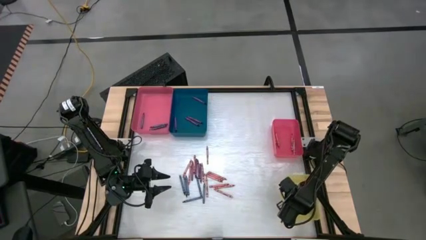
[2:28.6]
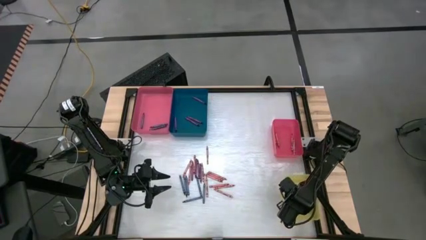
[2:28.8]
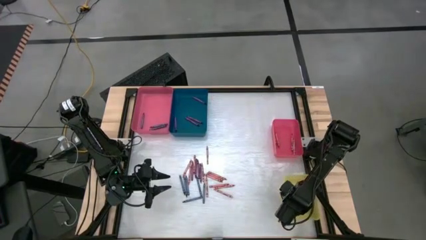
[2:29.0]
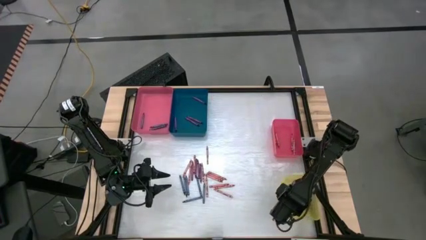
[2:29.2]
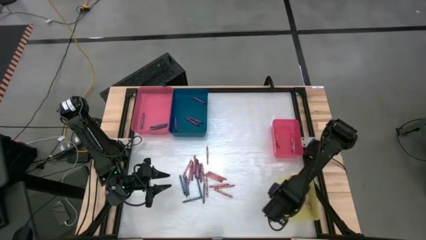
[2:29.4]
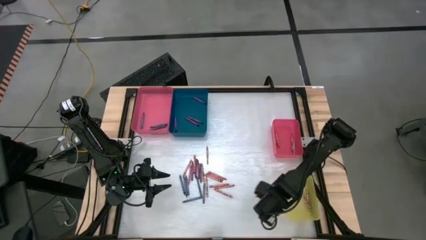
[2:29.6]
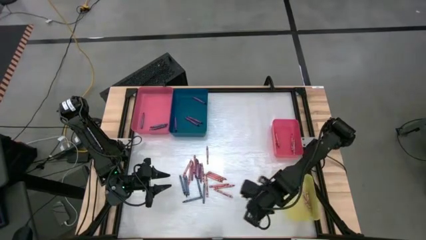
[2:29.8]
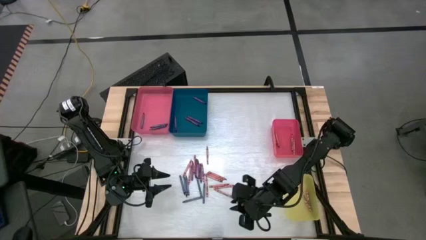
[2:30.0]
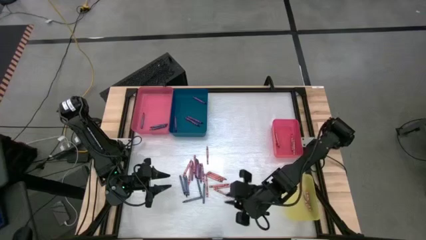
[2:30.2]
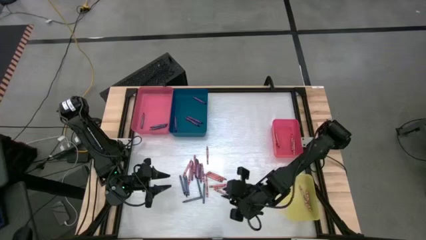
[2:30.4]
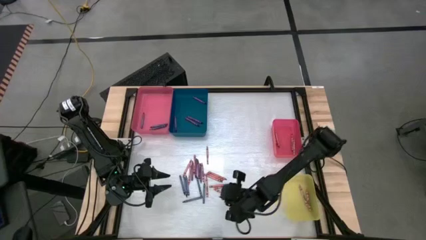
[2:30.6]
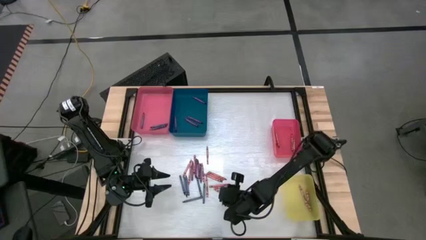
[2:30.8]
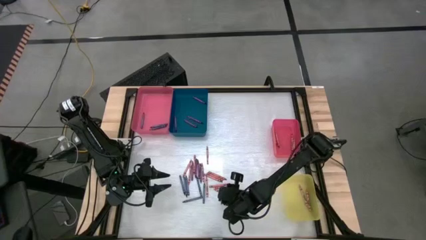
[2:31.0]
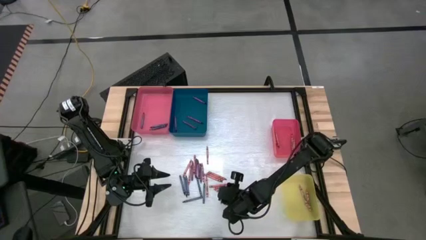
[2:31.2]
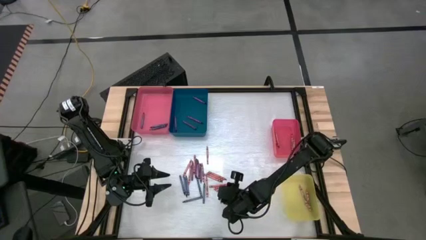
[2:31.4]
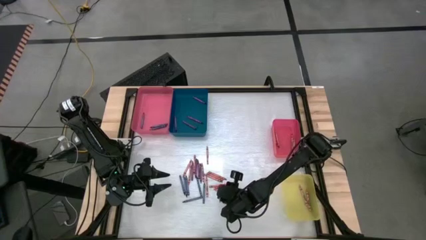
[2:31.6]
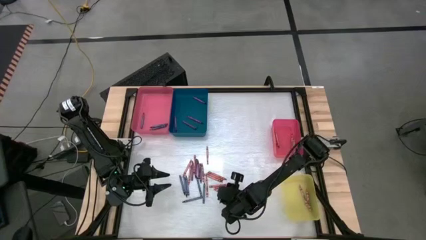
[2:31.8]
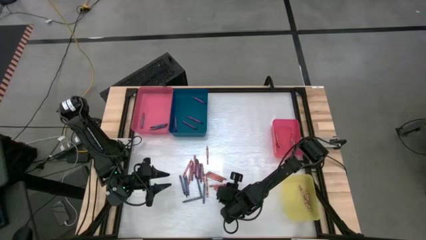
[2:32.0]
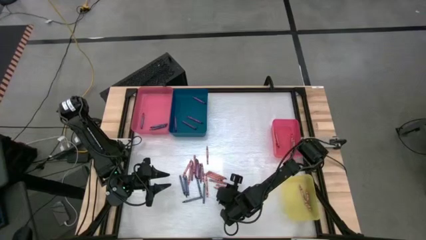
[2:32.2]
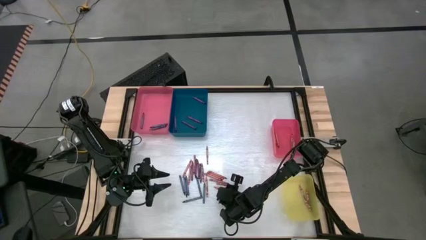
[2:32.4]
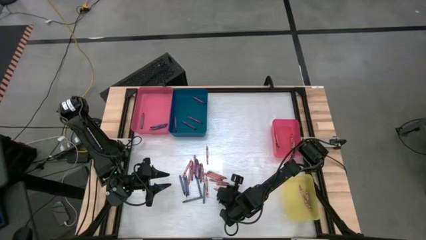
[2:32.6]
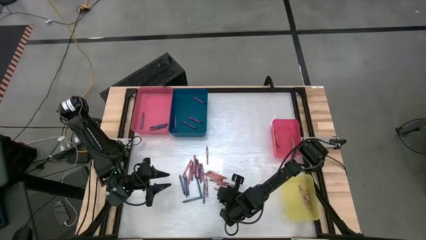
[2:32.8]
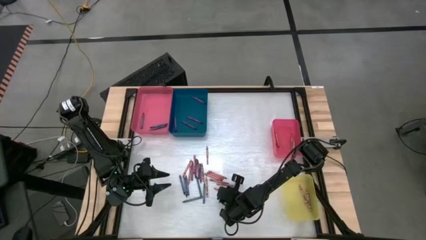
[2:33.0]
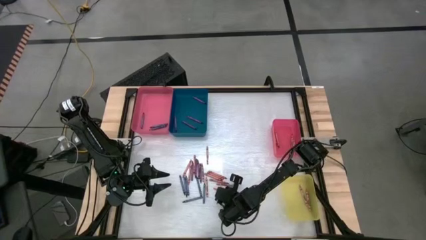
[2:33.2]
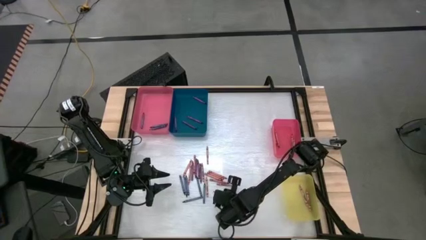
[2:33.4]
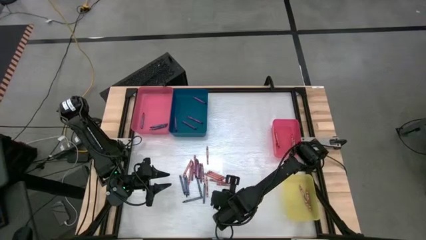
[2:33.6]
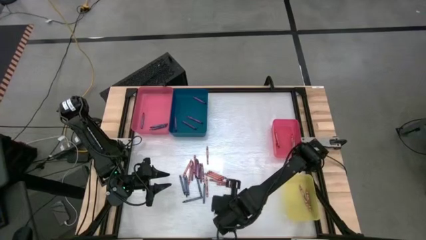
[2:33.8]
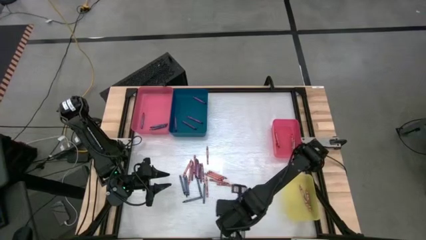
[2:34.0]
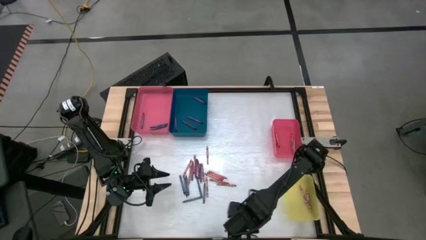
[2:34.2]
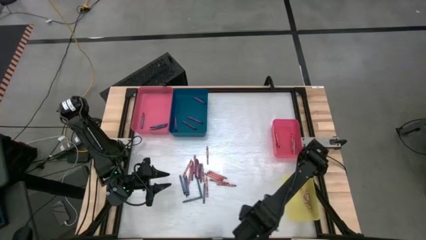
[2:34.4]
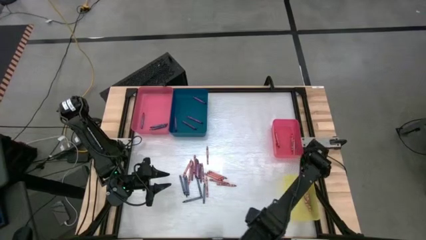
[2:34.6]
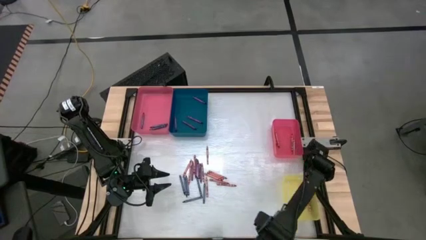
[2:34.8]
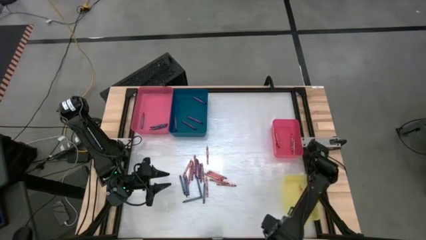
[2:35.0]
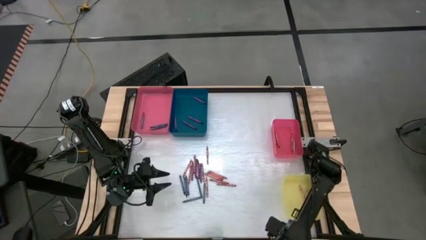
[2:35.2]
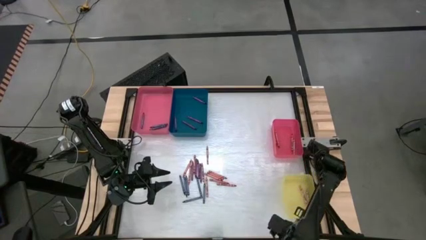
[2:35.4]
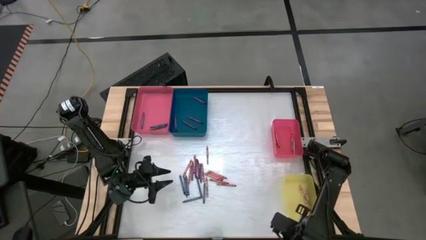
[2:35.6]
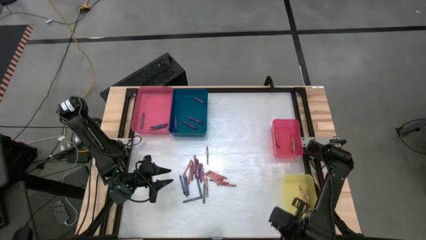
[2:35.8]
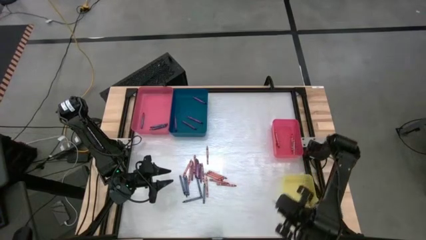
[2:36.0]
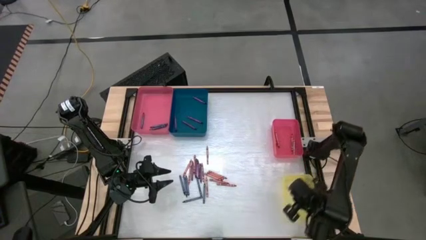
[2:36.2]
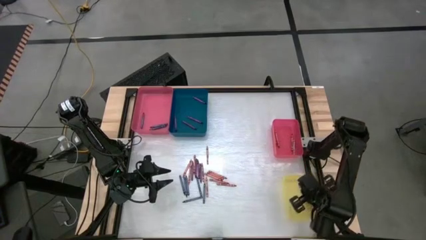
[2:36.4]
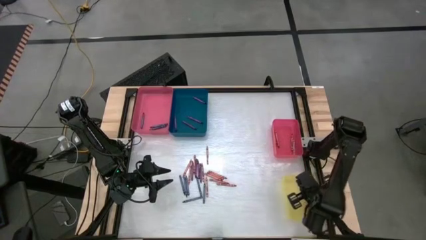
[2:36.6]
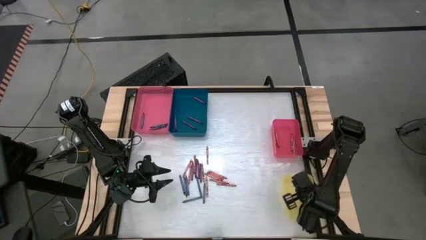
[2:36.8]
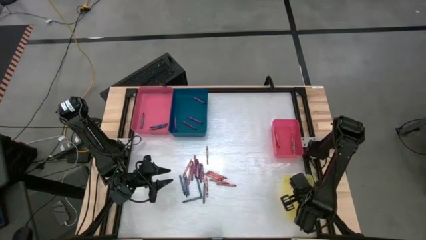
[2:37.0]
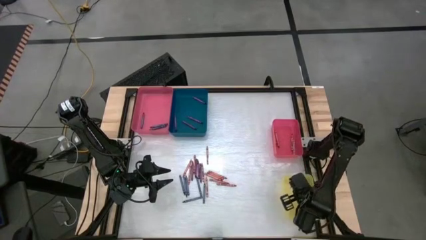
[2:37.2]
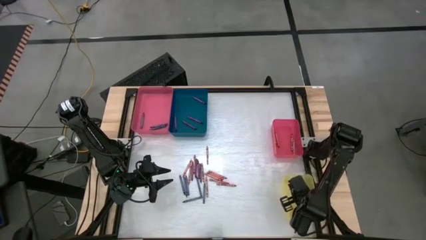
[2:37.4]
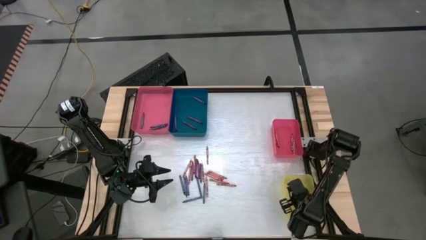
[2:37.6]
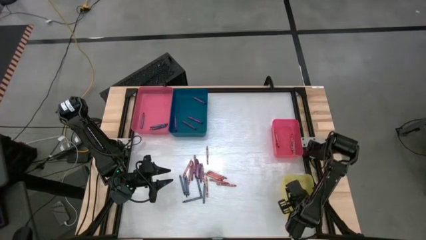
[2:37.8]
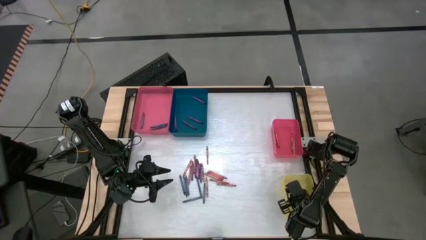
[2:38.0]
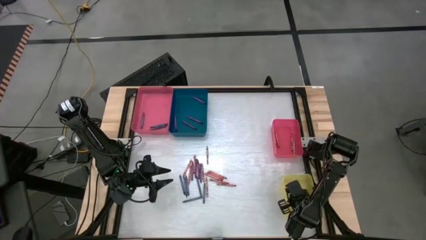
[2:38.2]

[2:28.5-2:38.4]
Task: Sort crayons
Put the pink crayon into the yellow bin

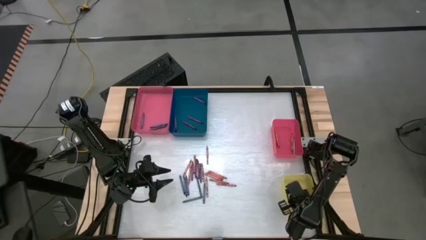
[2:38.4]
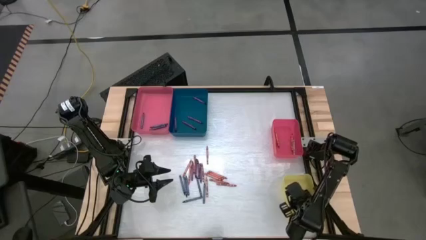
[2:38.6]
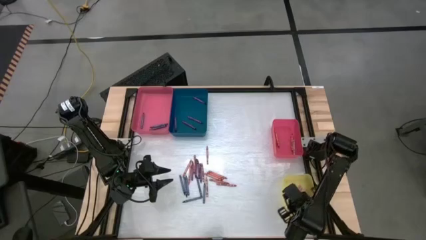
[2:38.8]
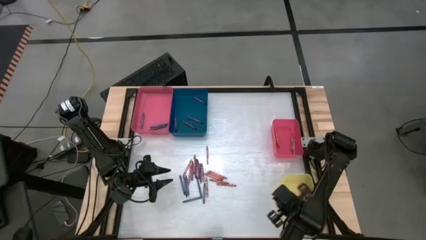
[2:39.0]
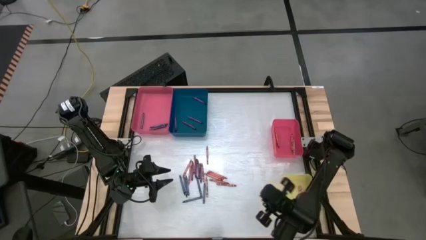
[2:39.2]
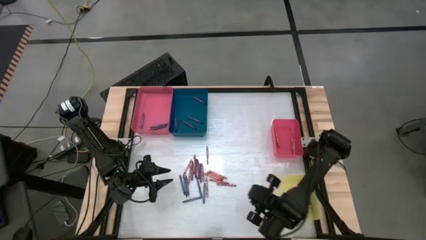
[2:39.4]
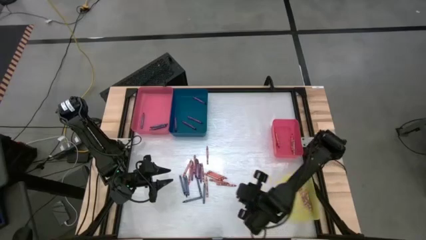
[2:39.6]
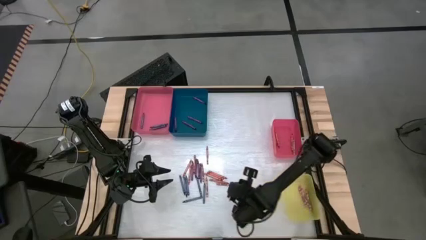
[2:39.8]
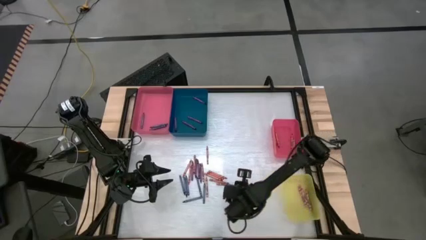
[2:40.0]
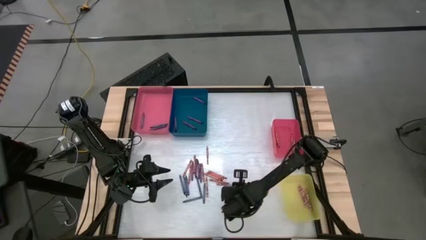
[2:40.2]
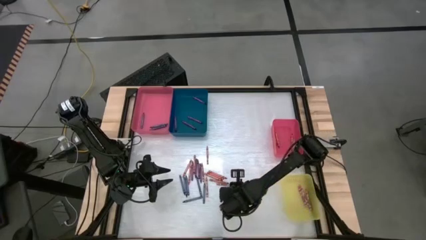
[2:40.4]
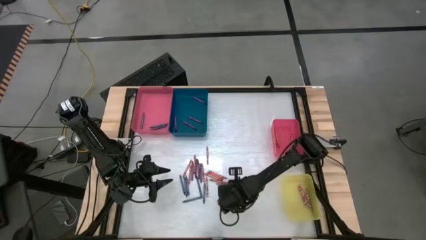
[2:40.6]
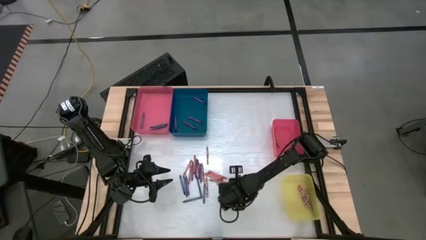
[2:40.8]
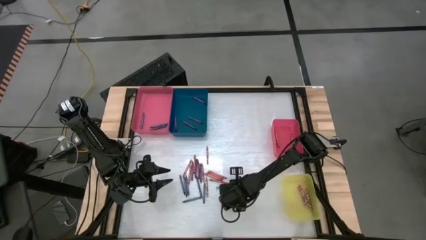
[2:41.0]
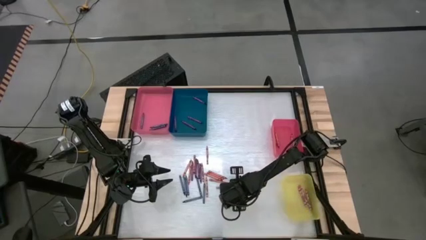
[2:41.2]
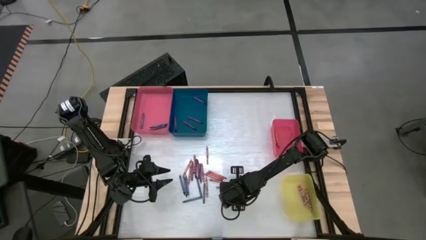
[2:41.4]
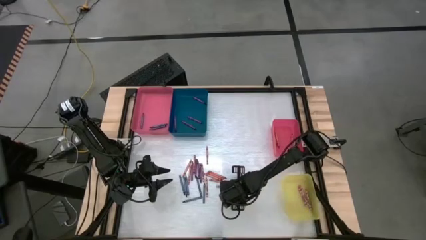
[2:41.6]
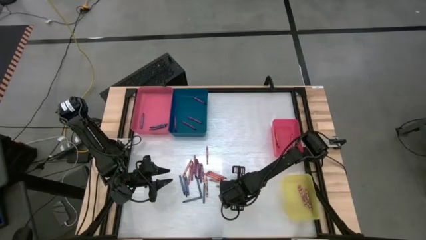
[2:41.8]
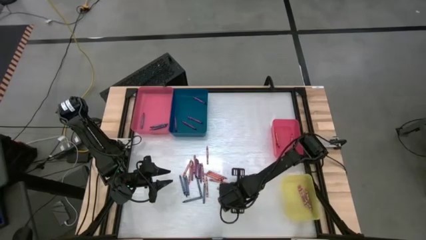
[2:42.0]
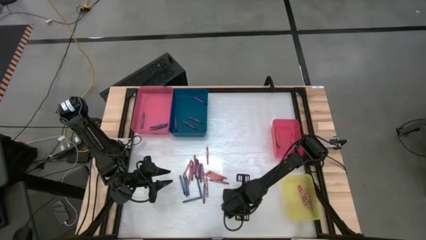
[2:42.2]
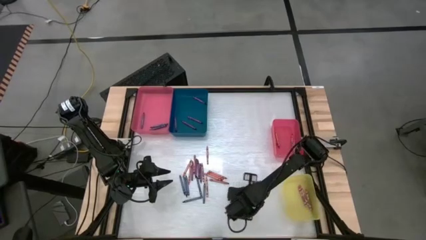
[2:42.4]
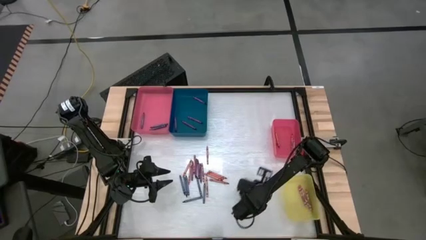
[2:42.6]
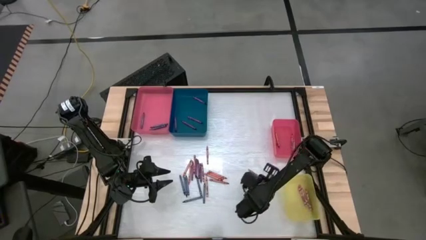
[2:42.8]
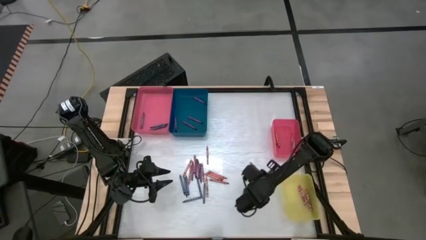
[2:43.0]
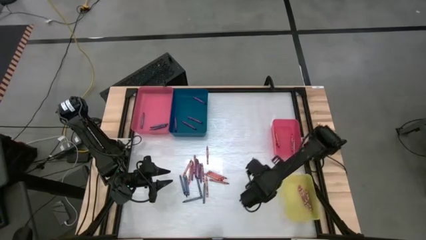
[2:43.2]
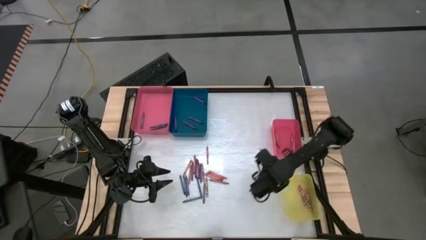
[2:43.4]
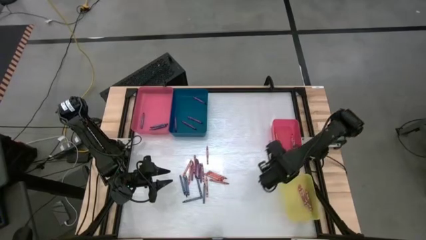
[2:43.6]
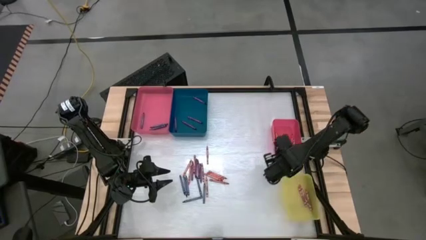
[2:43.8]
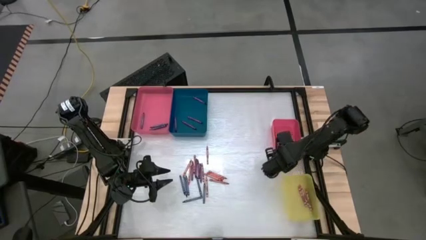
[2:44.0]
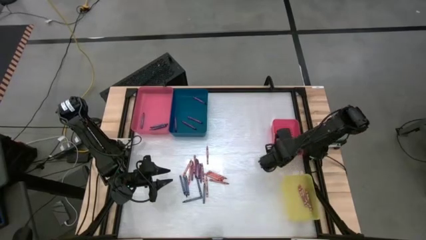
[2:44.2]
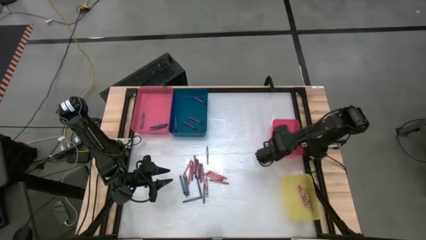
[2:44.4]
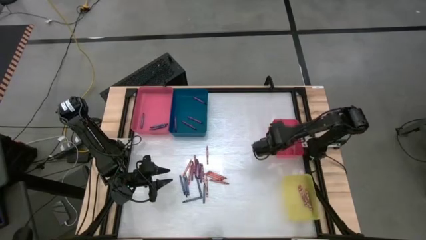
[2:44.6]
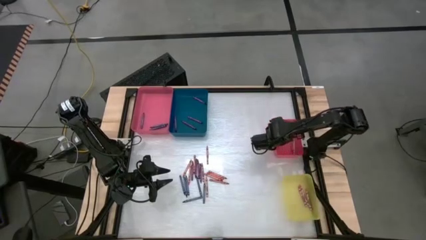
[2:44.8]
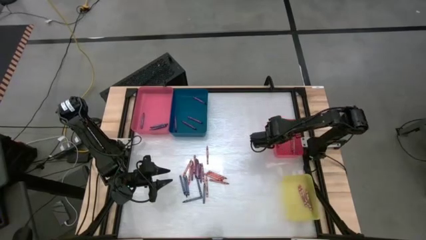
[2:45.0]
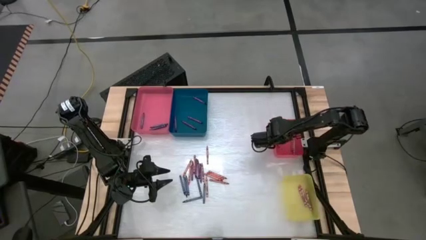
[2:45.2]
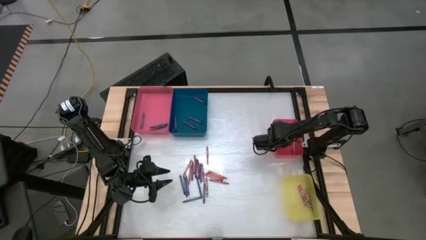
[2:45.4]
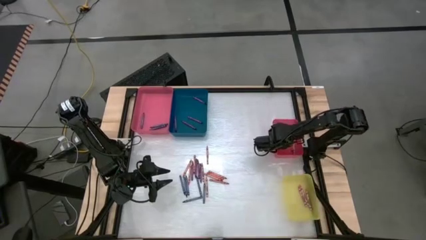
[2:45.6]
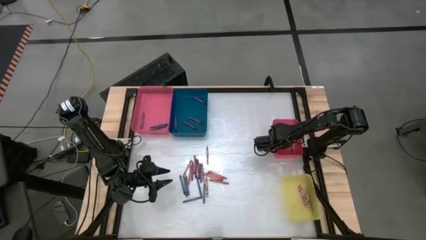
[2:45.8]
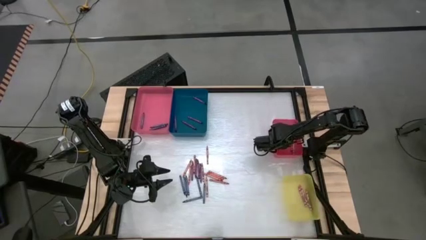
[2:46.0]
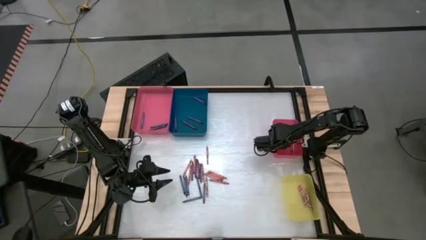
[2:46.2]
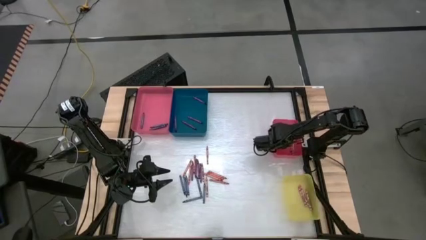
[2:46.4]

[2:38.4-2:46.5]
Put the red crayon into the small red bin
